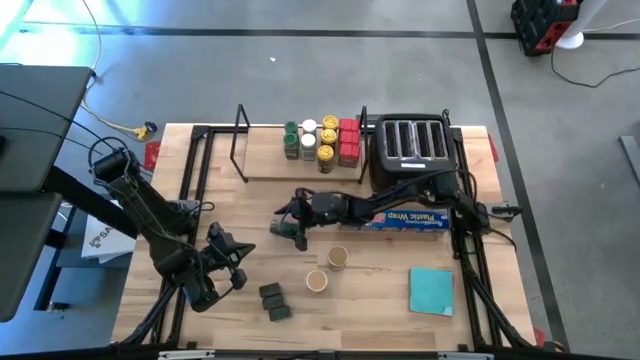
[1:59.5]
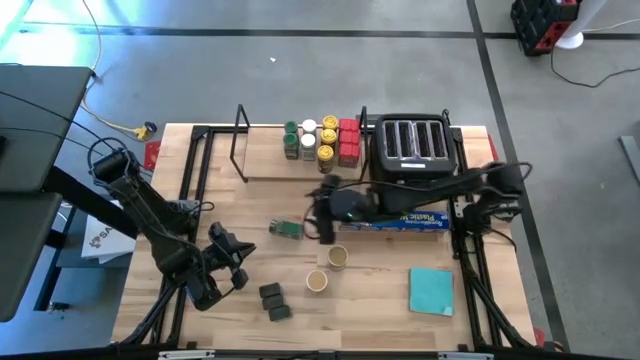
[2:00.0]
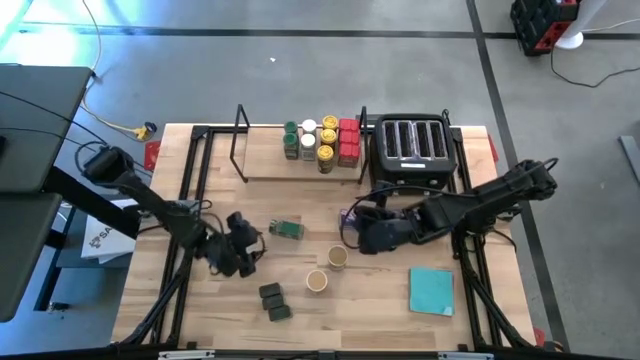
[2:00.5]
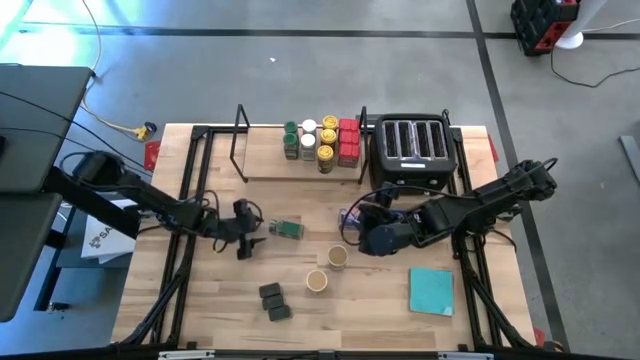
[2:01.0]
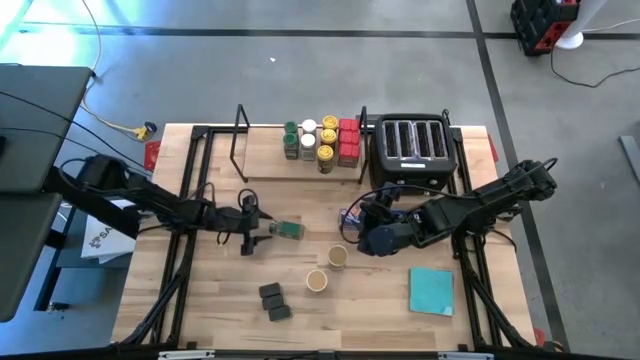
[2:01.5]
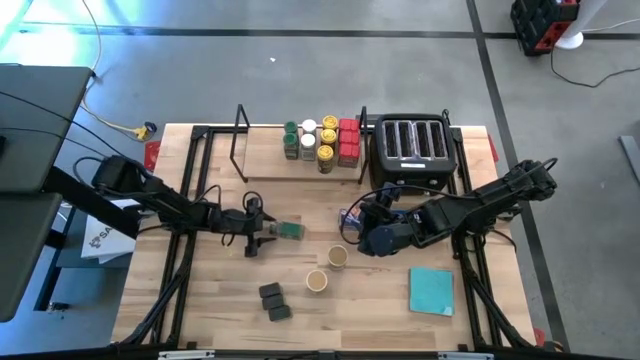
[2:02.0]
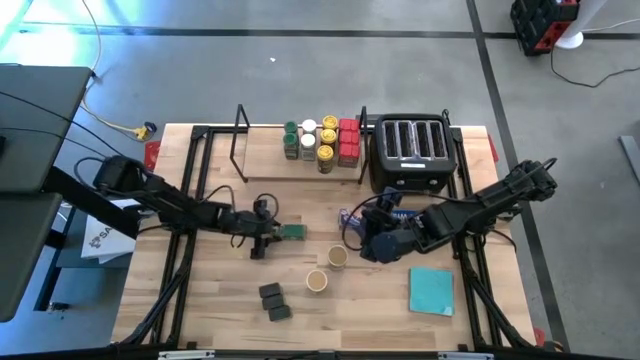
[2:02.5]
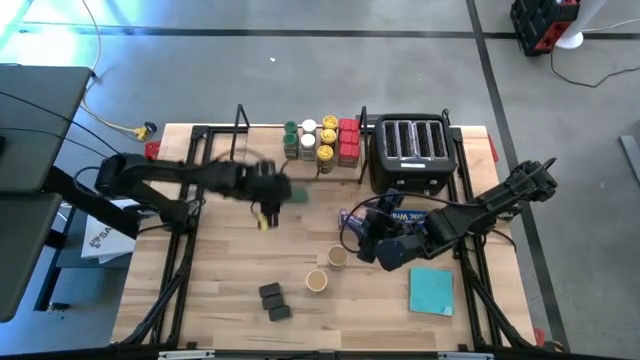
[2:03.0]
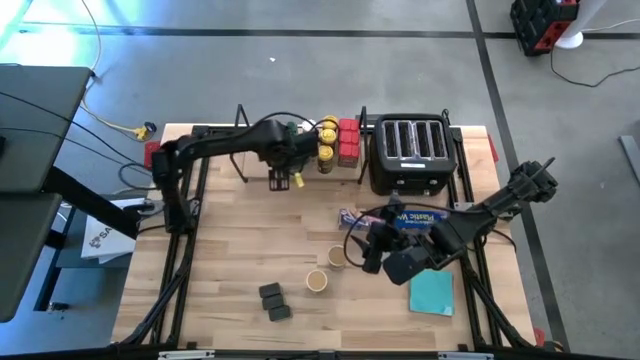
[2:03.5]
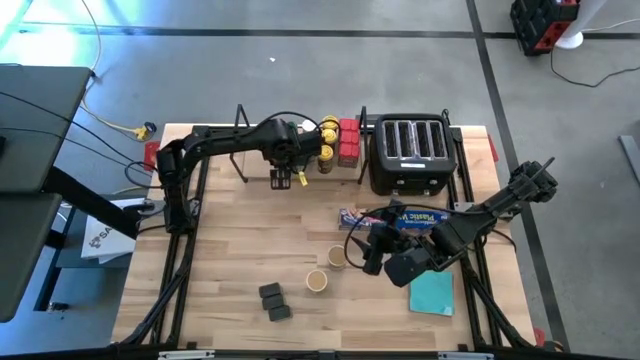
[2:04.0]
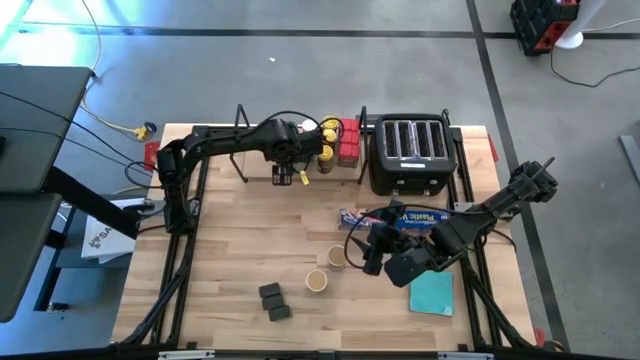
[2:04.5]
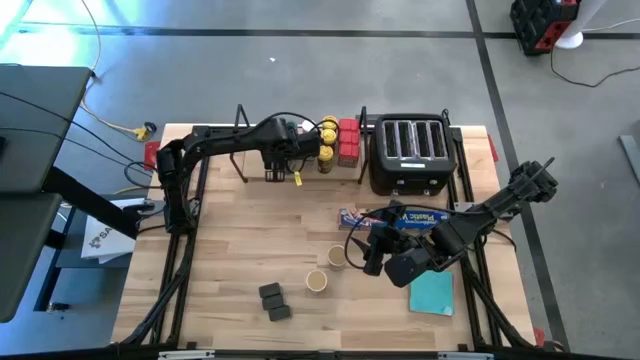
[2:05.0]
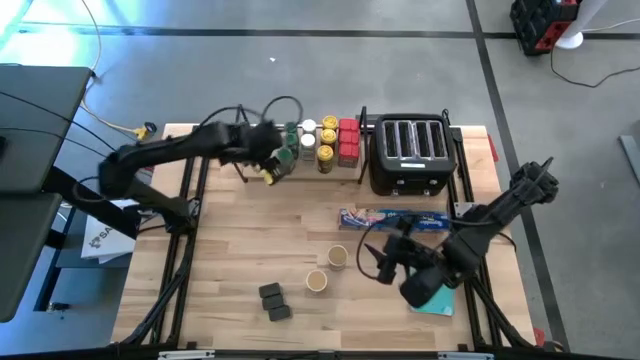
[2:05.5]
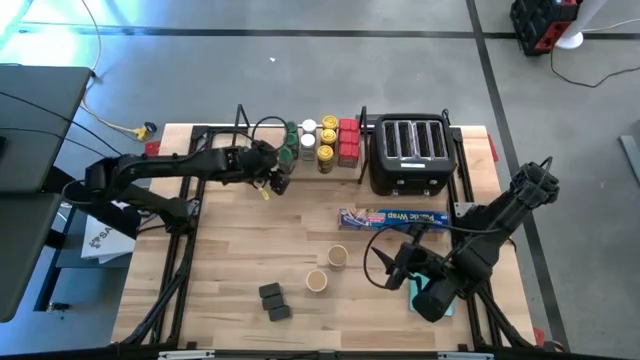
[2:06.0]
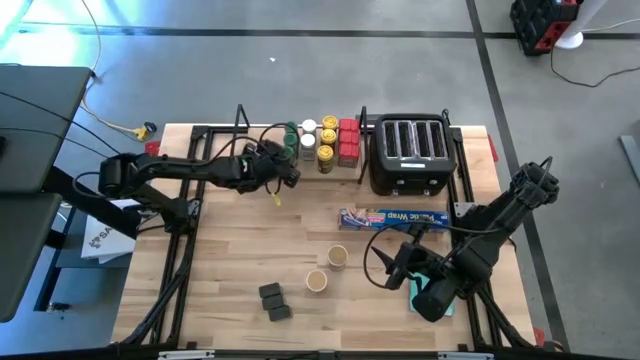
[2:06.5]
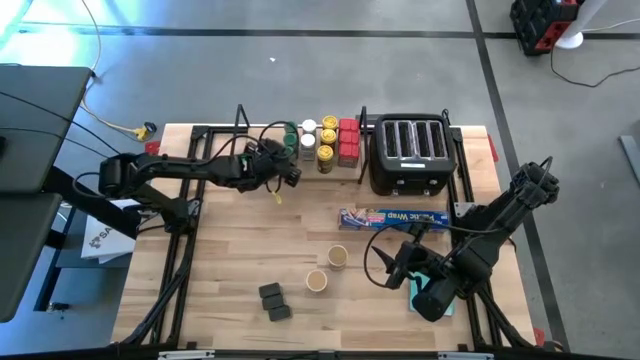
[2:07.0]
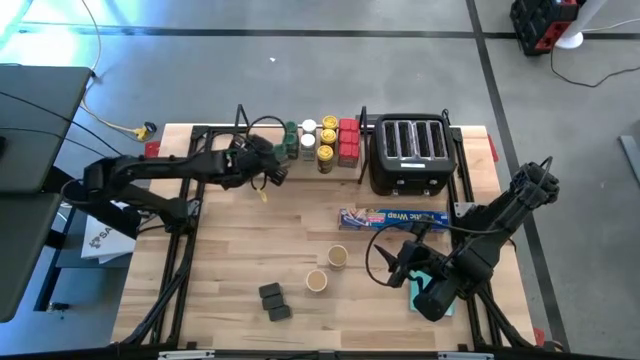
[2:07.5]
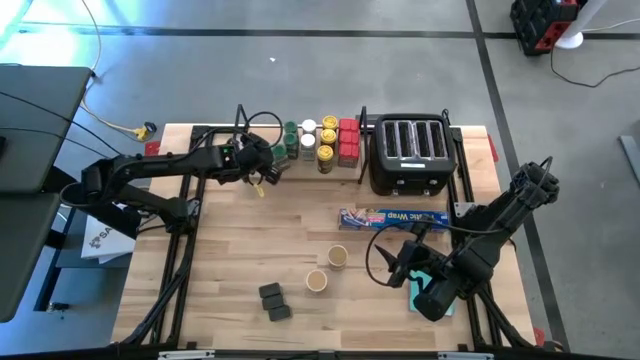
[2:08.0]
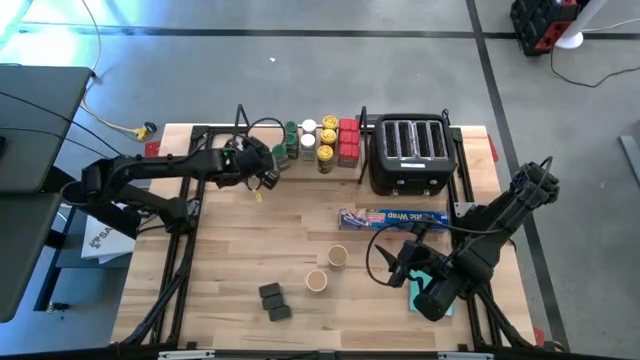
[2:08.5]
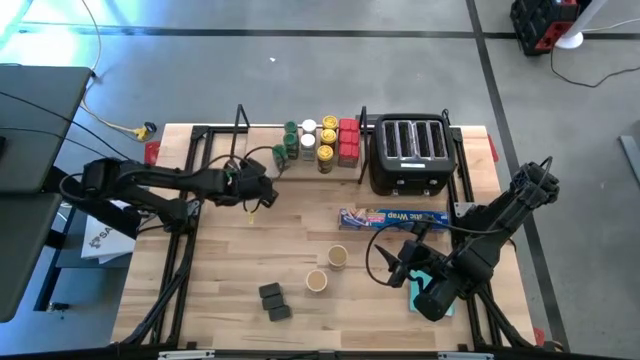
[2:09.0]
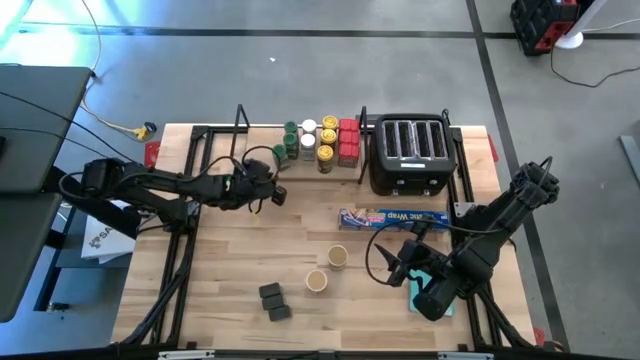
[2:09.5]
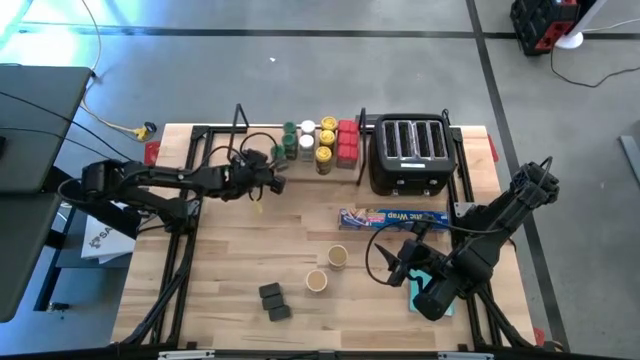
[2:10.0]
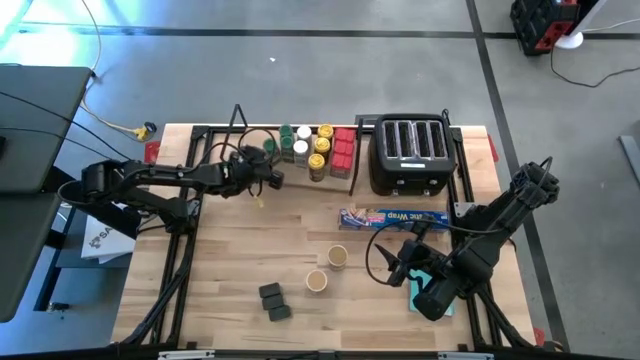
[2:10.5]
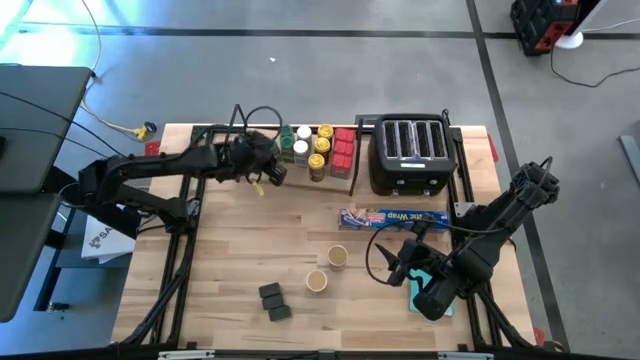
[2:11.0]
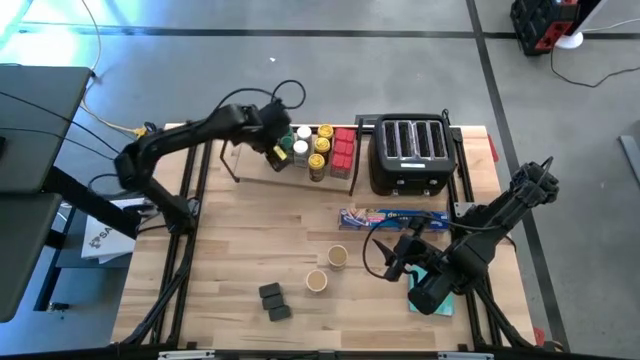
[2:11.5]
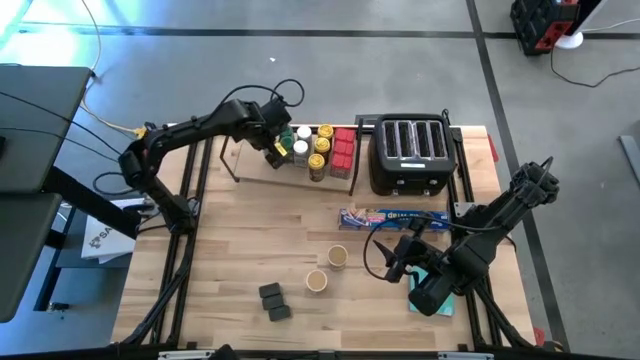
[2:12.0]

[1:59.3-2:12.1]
Task: Shelf spices
Put the green seasoning bottle on the shelf aligned with the other green seasoning bottles

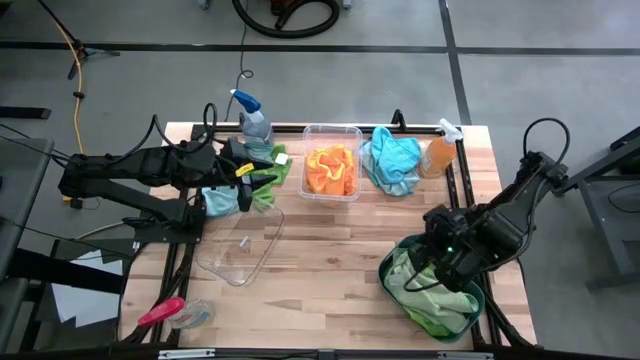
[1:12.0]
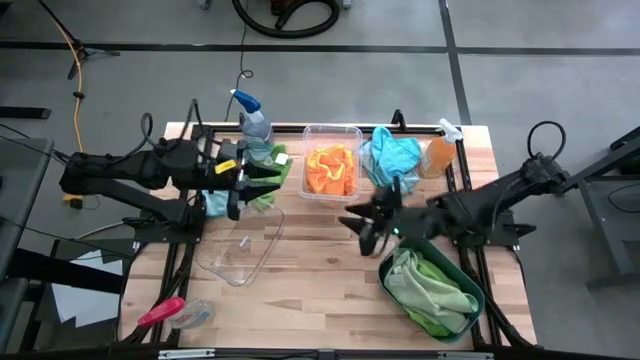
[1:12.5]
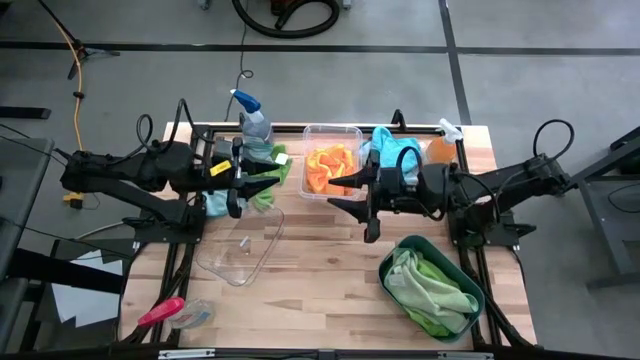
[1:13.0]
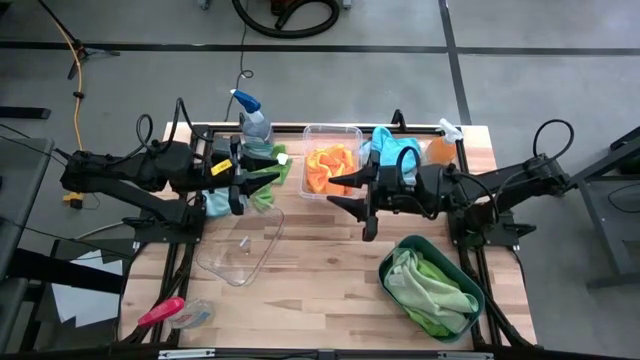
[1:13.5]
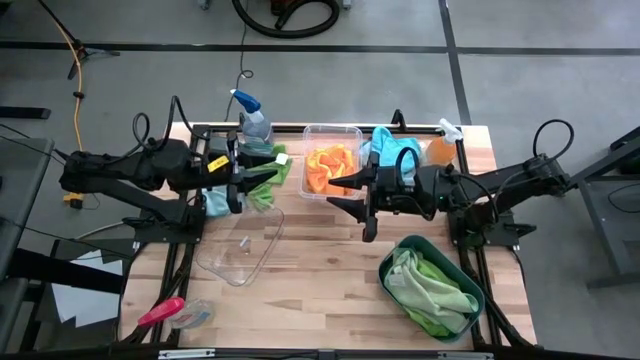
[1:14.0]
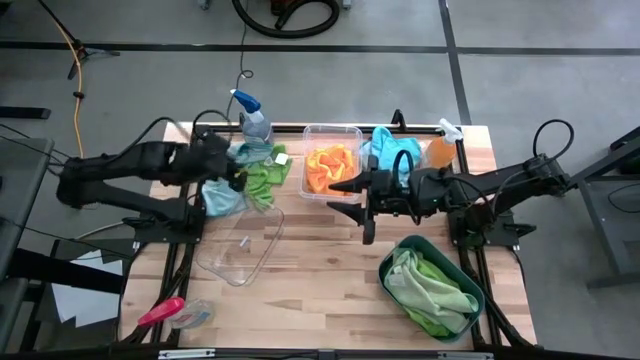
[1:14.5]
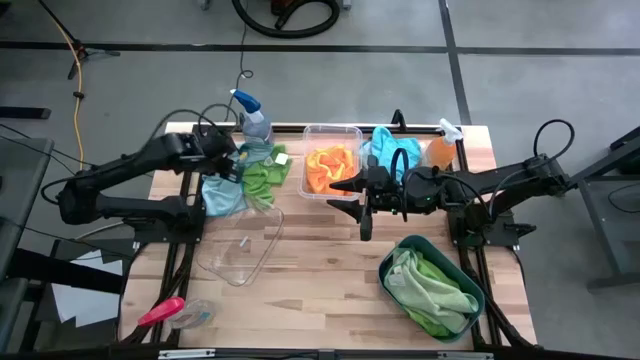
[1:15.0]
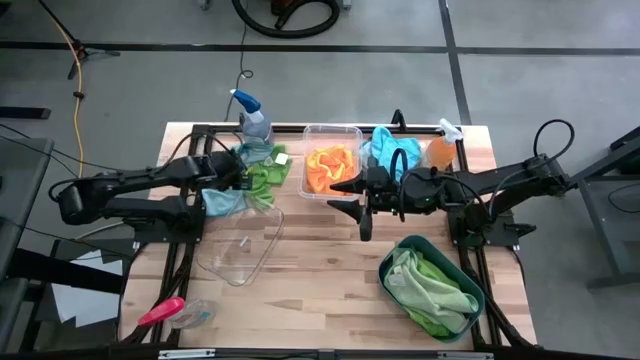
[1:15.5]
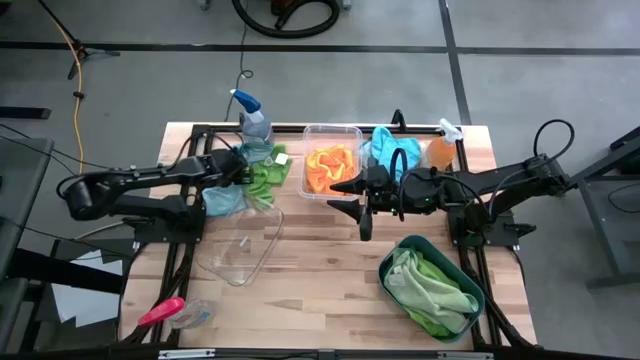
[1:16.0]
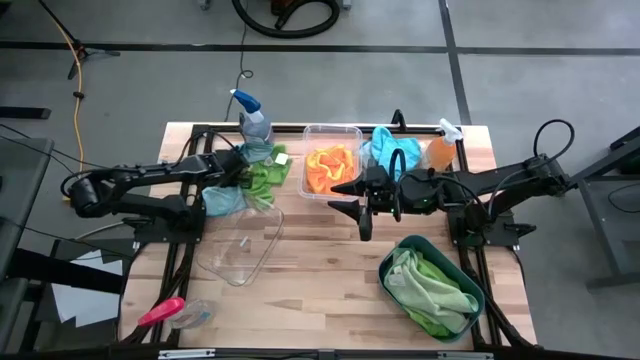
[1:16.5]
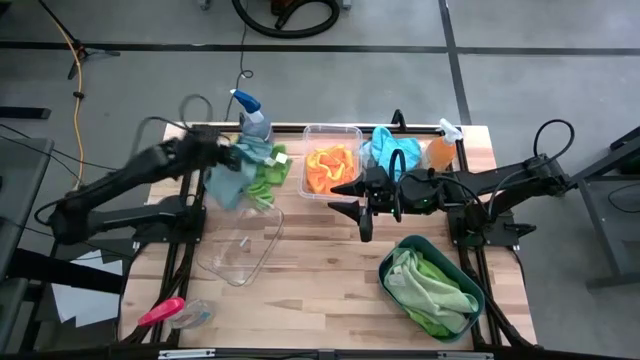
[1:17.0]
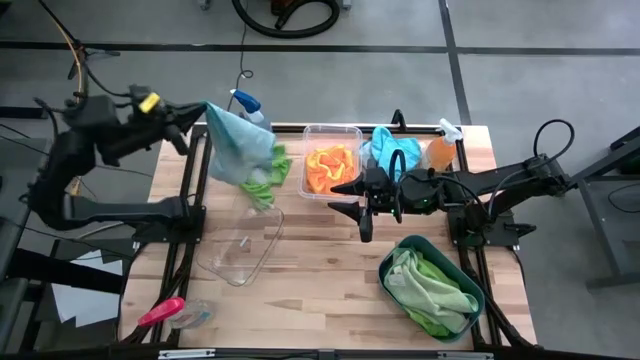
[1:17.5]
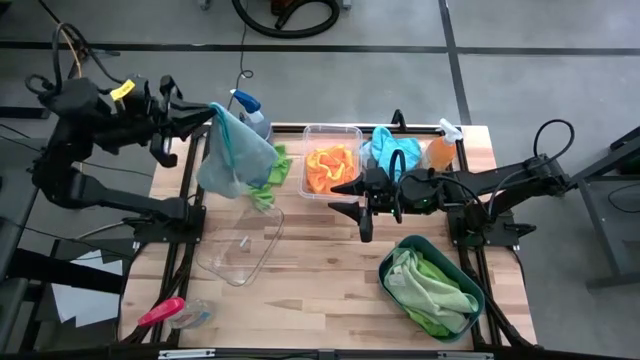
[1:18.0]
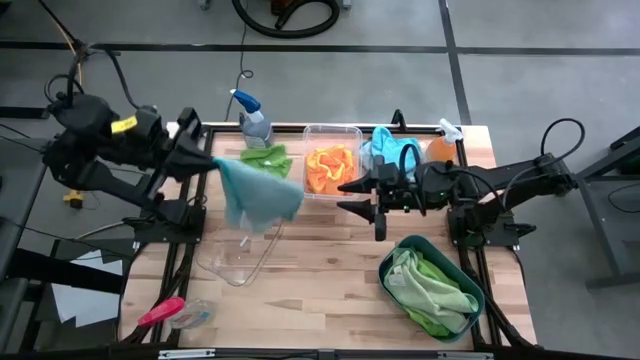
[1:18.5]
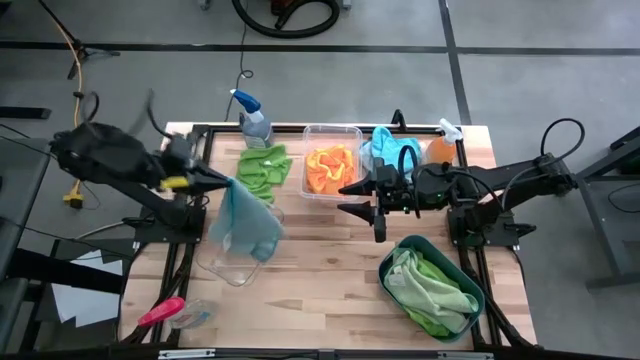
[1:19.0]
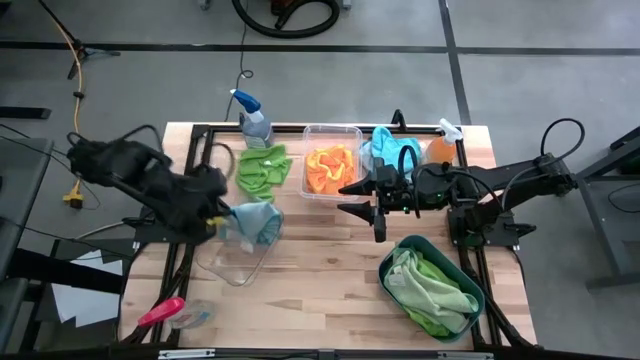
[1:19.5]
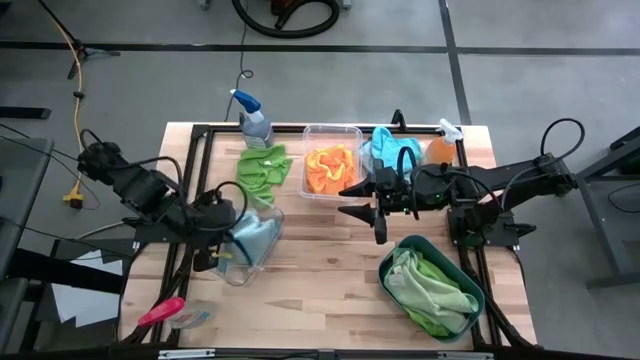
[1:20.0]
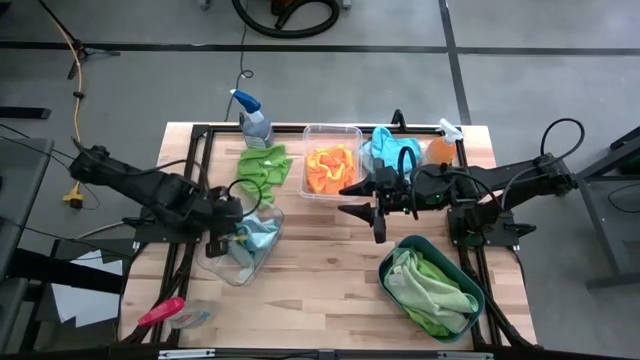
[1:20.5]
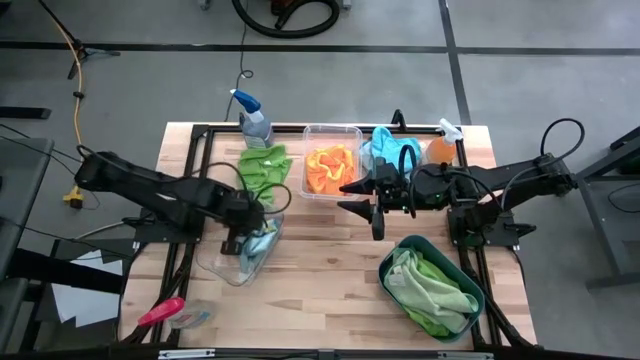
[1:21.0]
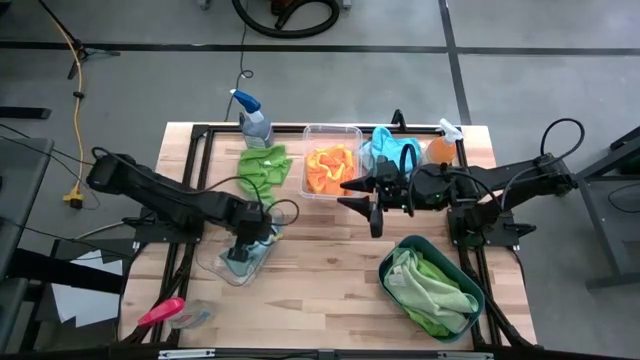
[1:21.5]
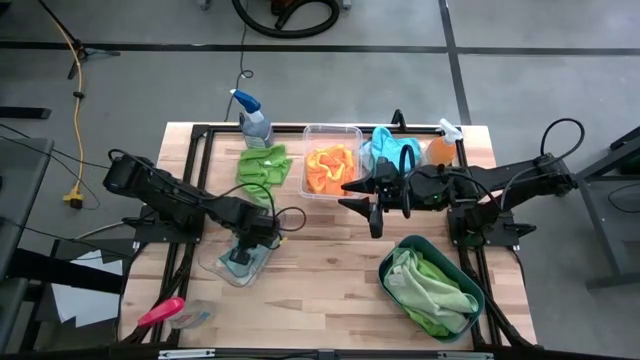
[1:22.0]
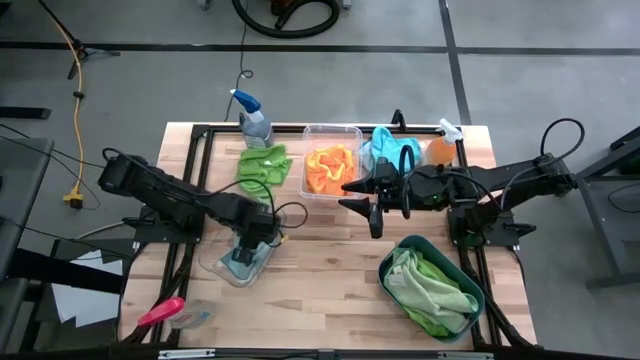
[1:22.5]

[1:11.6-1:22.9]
Task: Sort microfiber towel by color & place in baskets
Put the light blue towel into the bottom transparent bin
